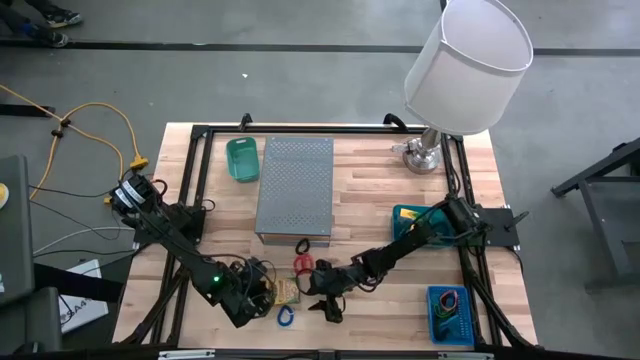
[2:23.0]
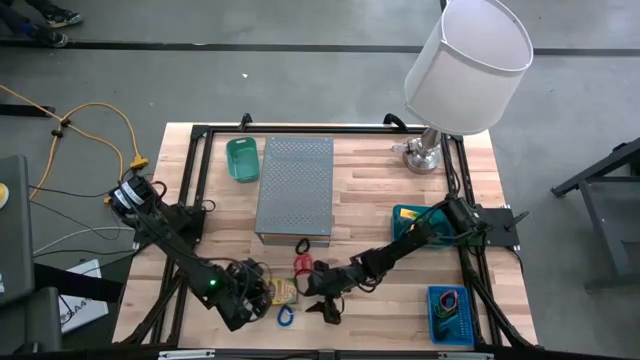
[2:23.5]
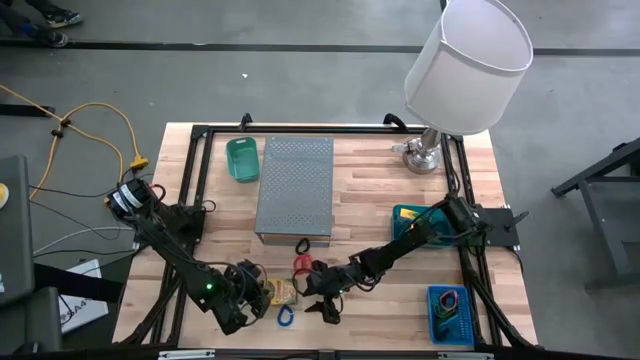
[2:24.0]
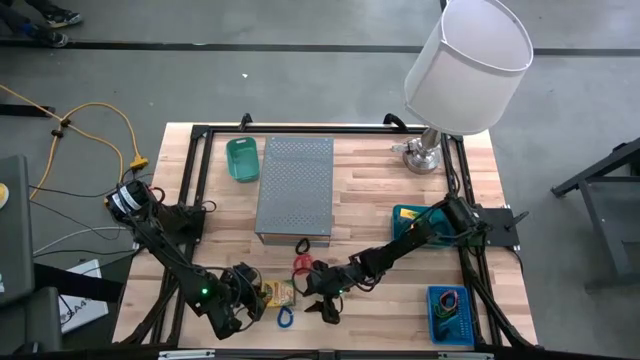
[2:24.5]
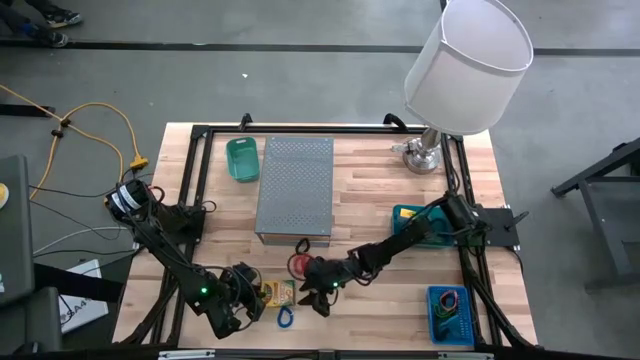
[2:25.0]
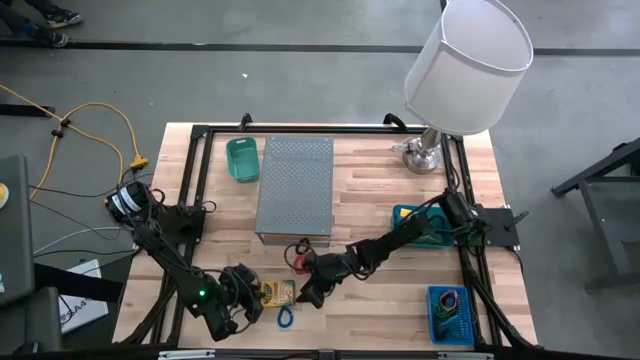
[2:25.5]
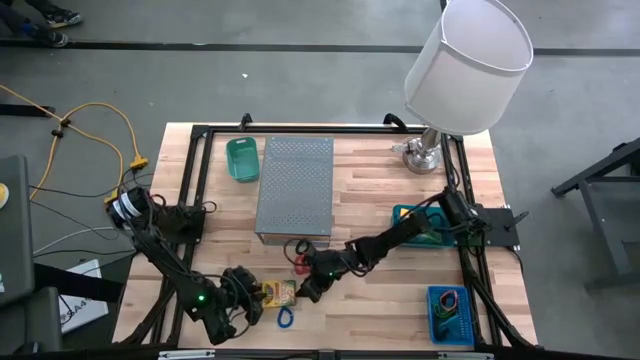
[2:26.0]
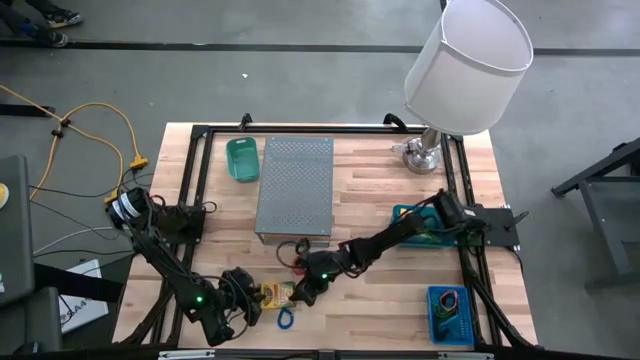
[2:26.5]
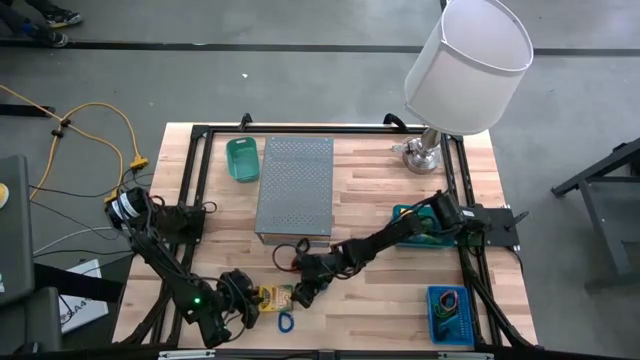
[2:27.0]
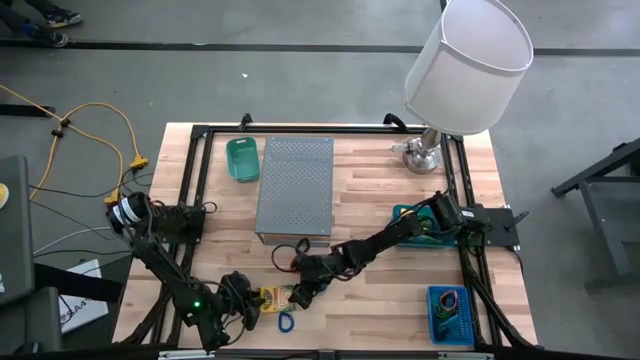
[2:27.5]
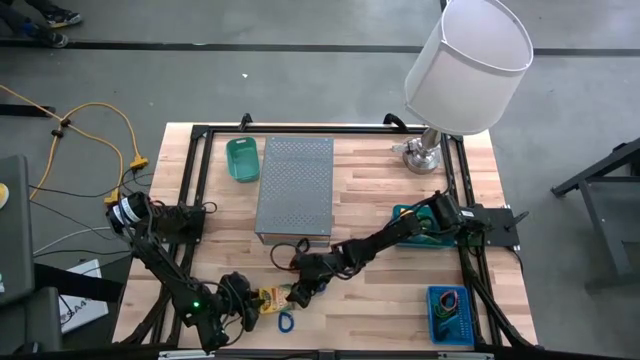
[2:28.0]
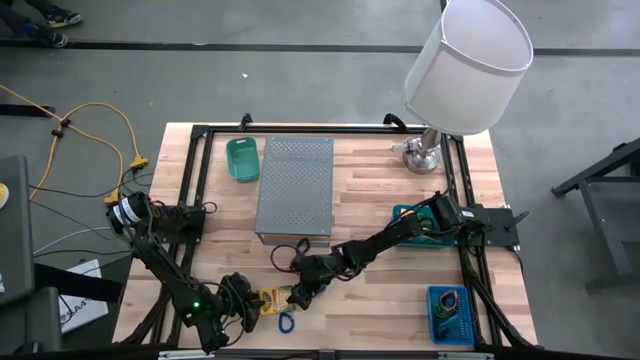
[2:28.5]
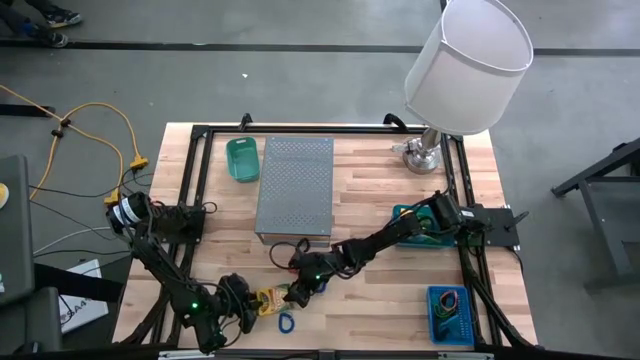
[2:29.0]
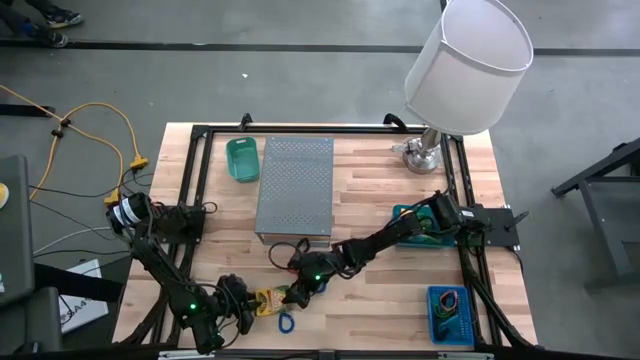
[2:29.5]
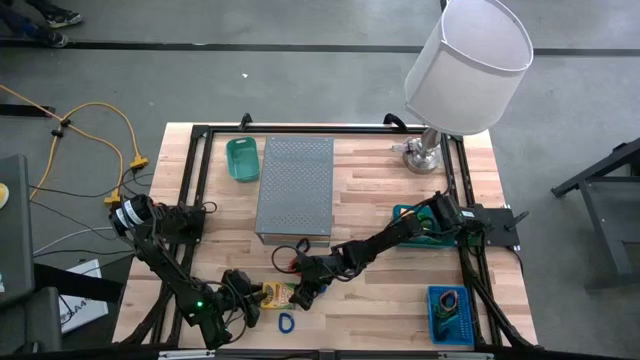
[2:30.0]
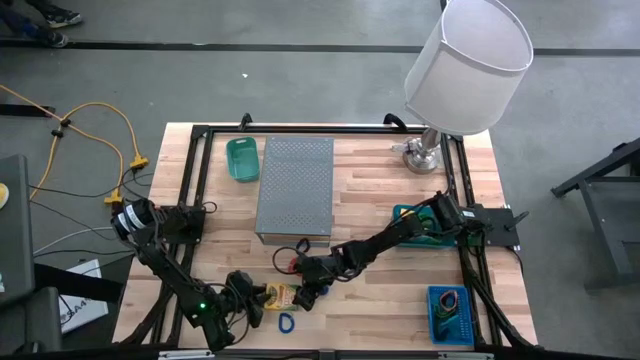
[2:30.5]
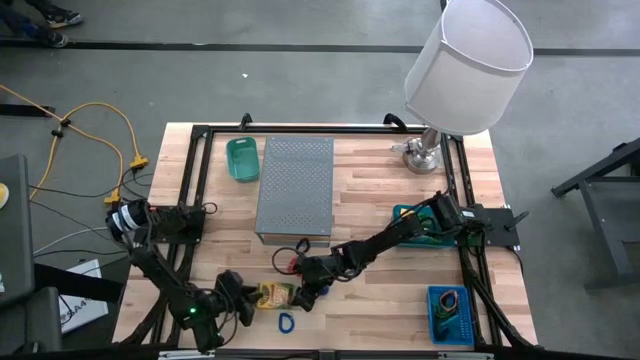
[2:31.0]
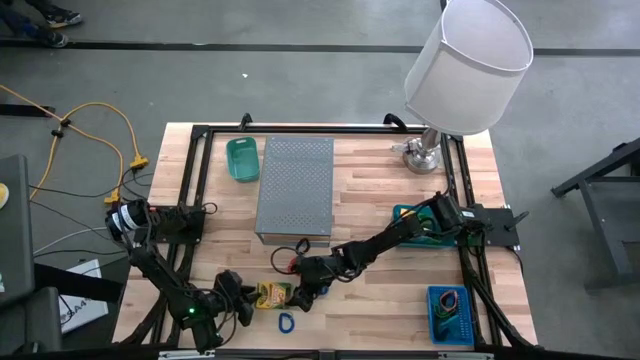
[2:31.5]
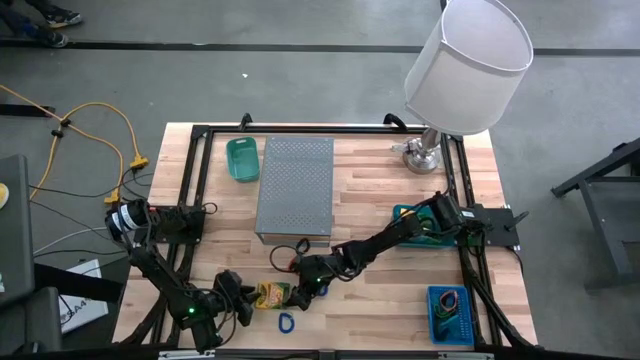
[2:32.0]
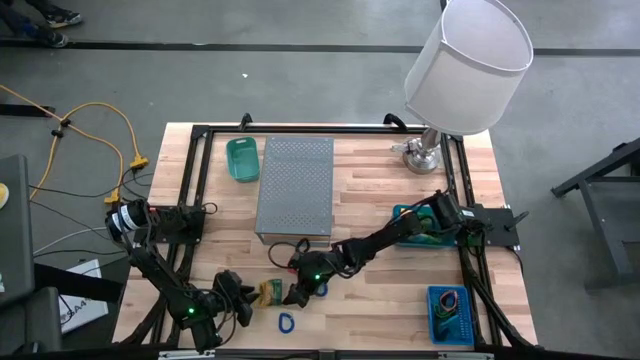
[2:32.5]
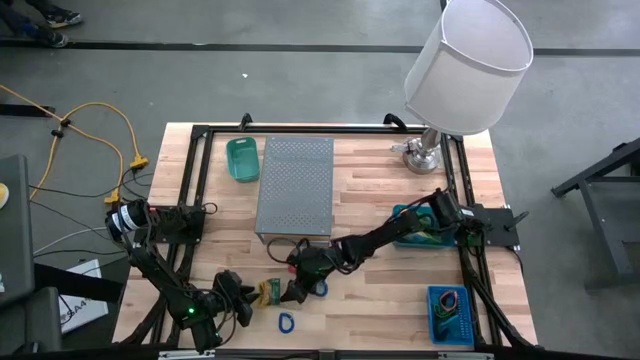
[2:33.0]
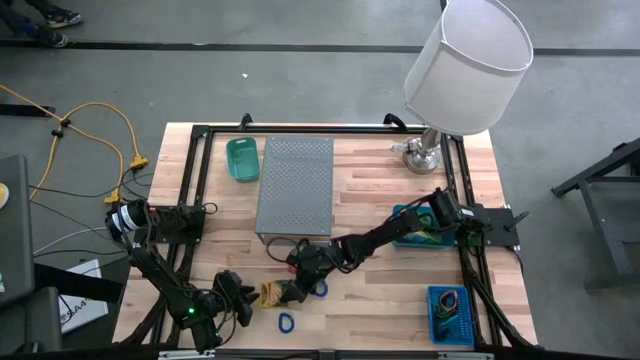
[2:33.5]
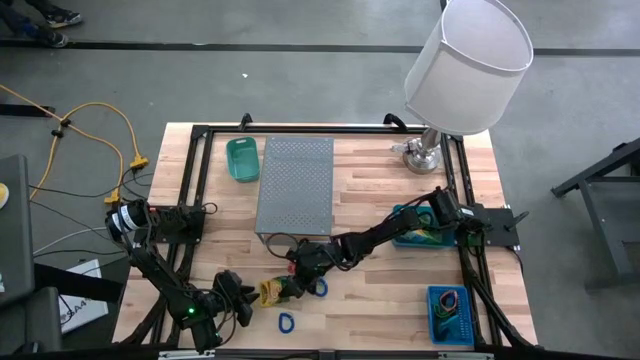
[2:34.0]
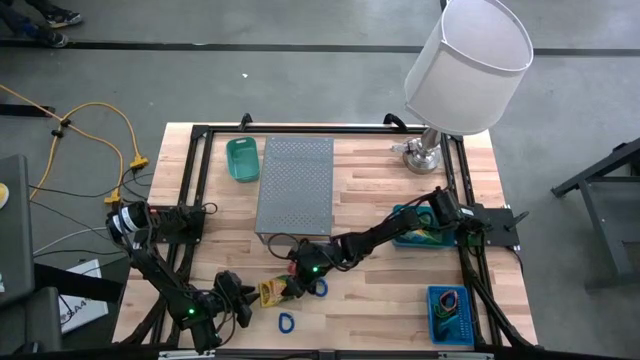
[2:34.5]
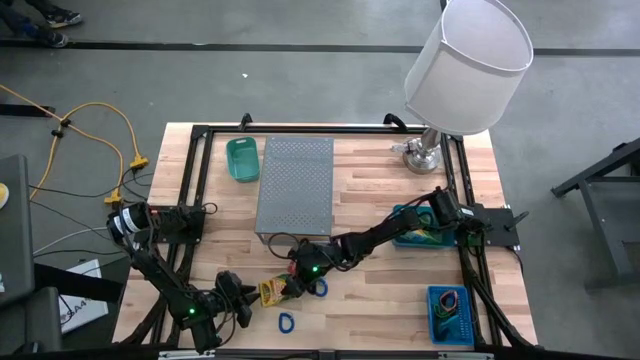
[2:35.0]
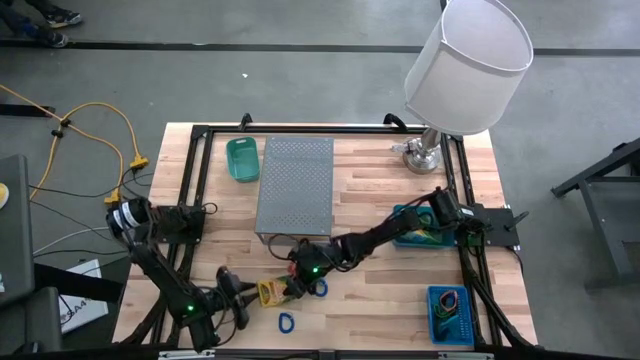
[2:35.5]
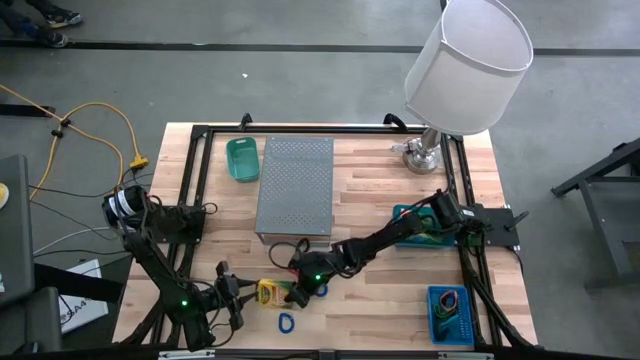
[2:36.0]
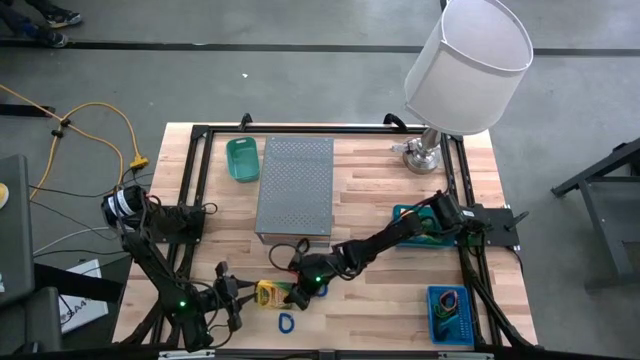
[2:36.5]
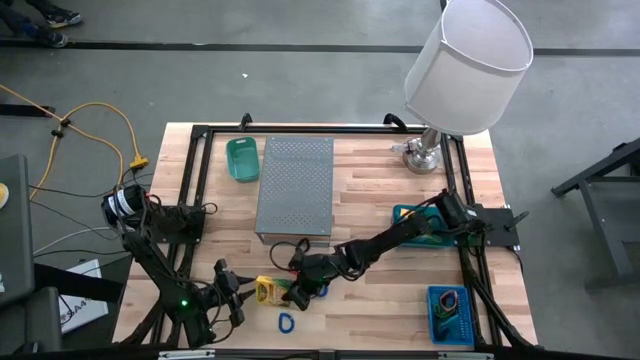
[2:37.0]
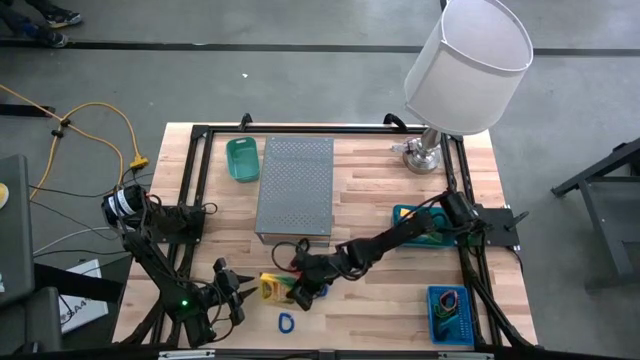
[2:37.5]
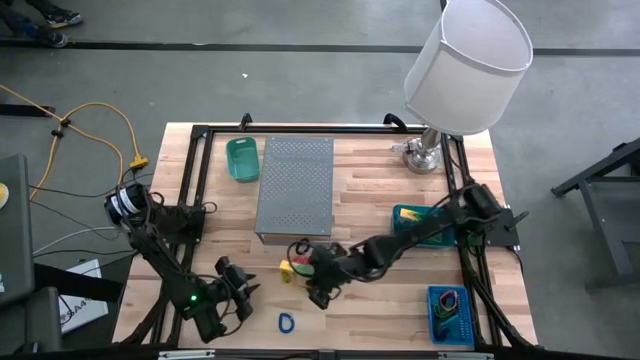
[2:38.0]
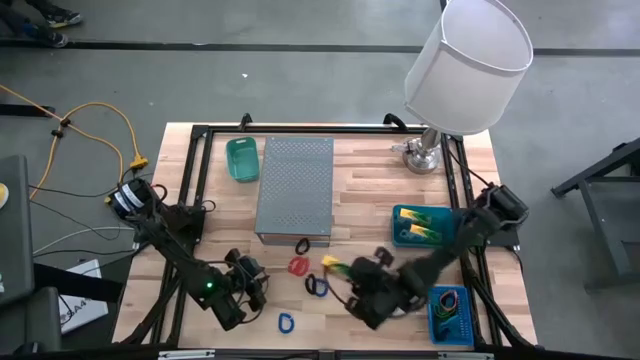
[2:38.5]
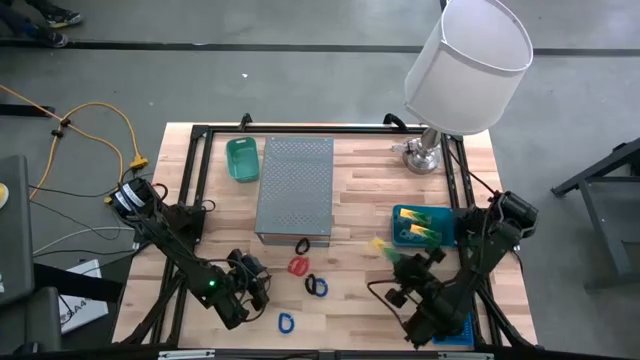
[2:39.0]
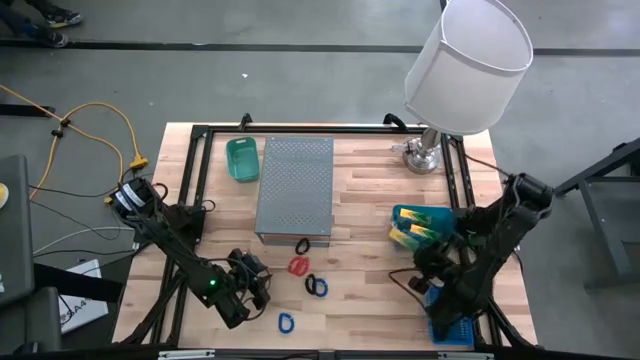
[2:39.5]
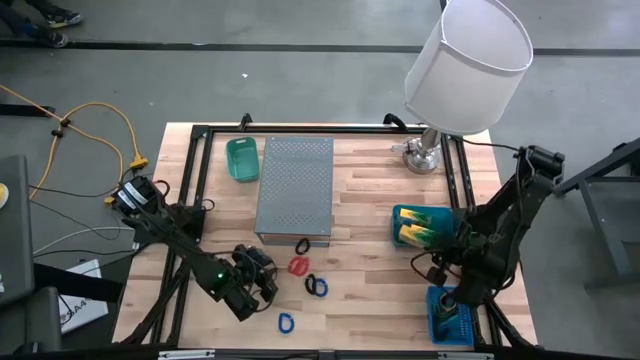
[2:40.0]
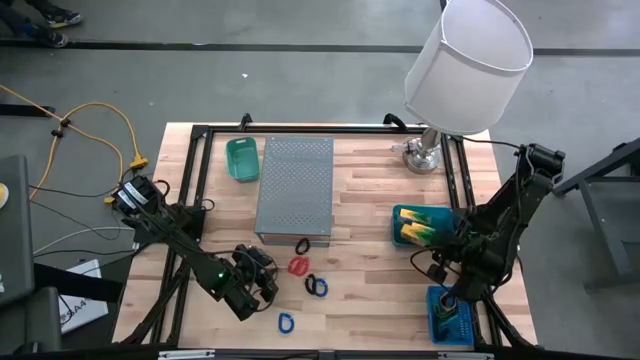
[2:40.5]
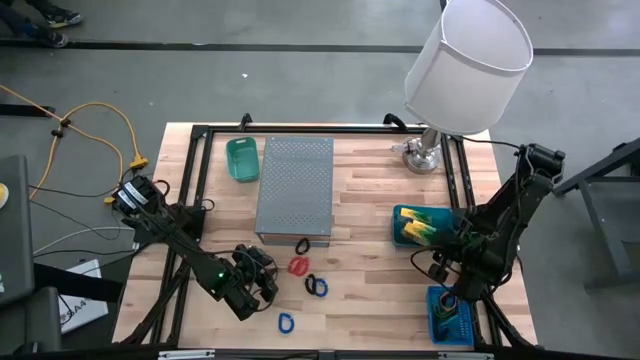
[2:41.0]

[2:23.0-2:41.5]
Task: Pick & Place Office Desk Supplies
Put the crayon box into the blue bin

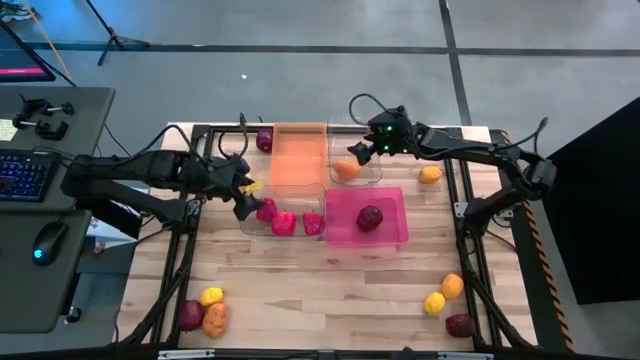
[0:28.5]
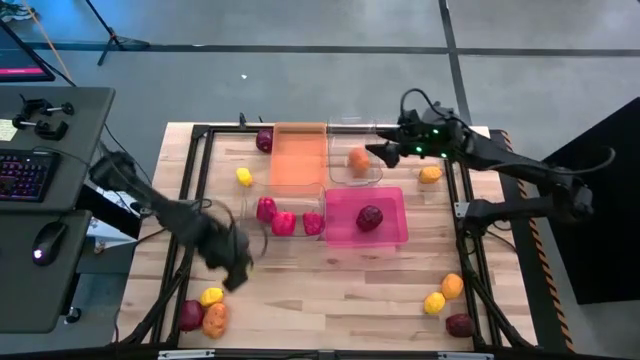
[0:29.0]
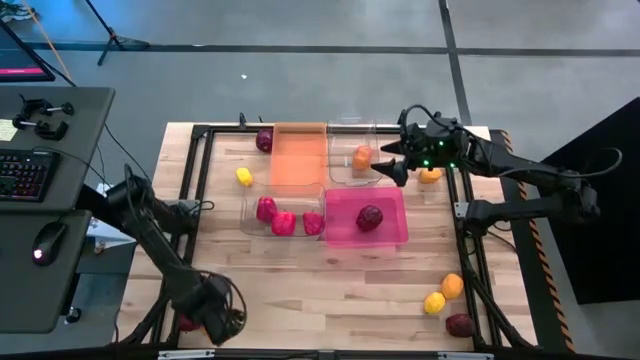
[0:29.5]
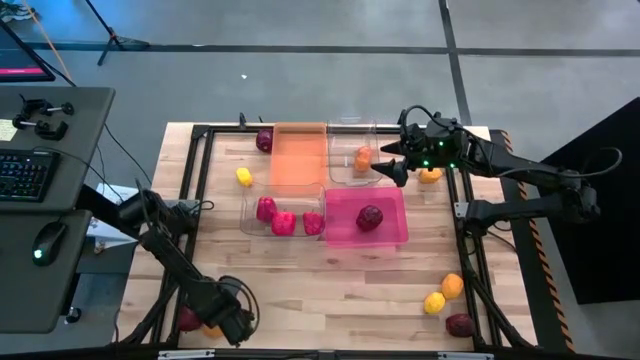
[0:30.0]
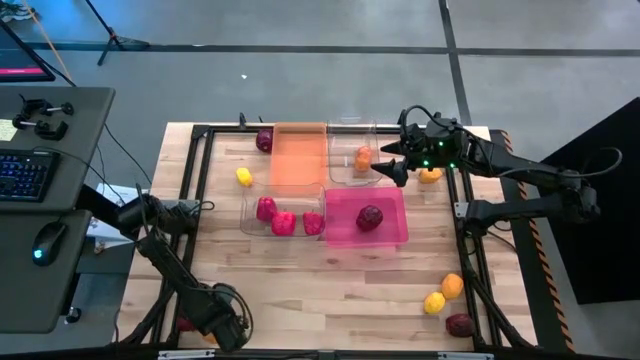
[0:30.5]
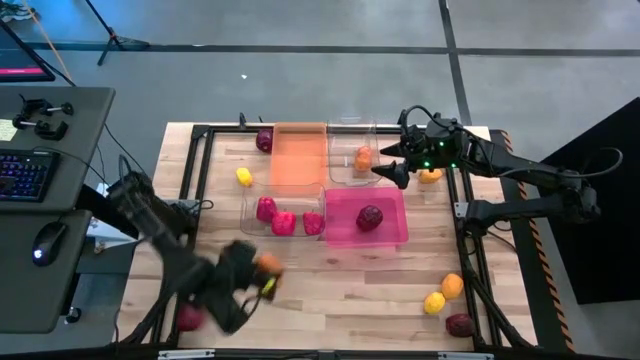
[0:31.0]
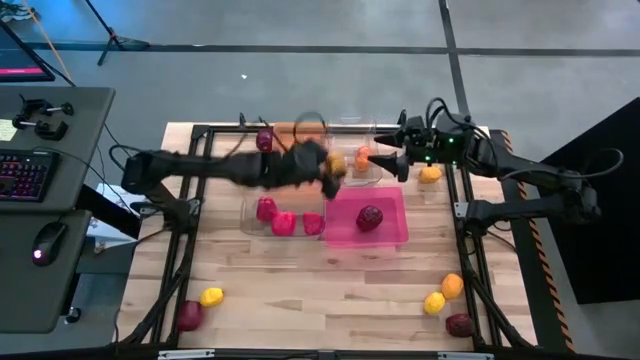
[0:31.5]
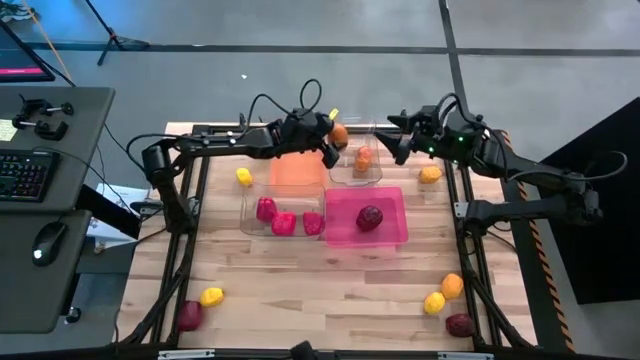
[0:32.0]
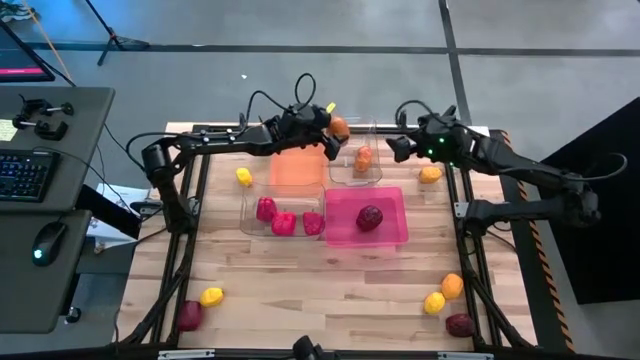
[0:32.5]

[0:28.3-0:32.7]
Task: Sort produce into baskets
Put the potato into the right transparent bin
